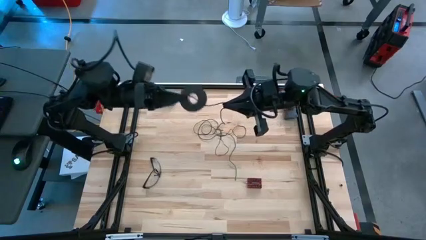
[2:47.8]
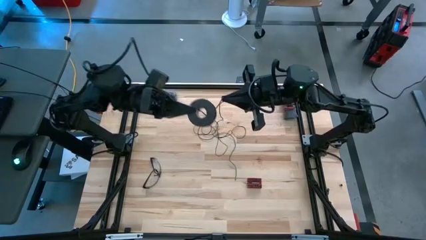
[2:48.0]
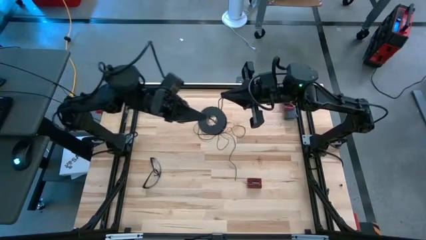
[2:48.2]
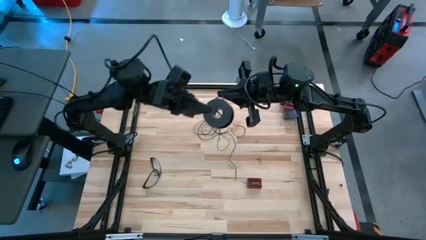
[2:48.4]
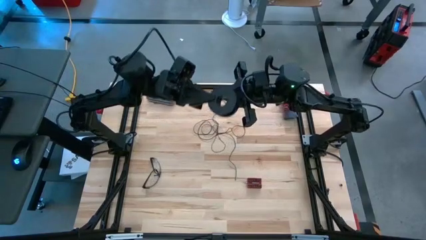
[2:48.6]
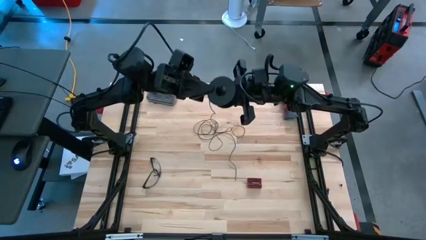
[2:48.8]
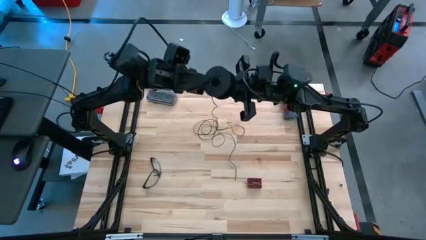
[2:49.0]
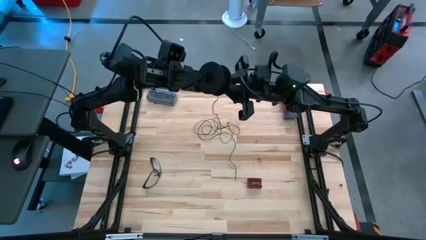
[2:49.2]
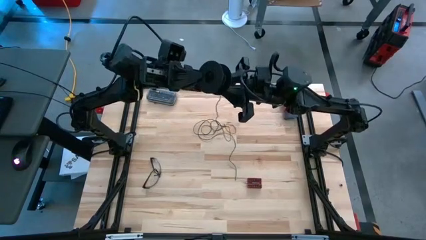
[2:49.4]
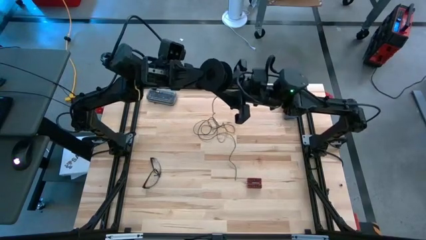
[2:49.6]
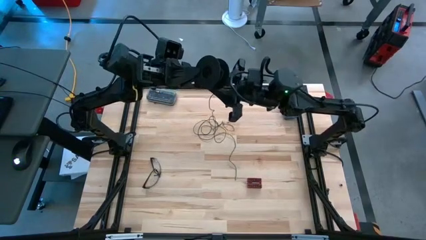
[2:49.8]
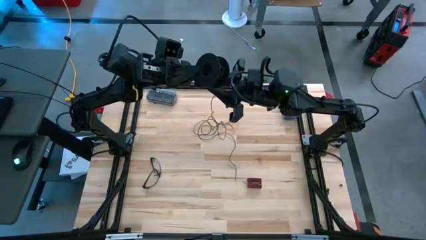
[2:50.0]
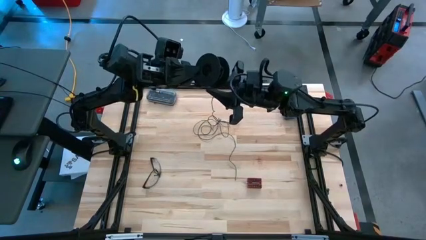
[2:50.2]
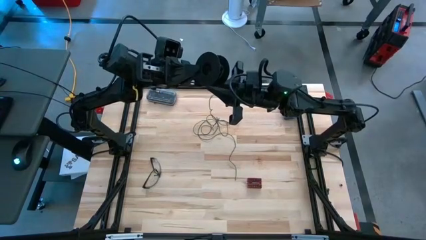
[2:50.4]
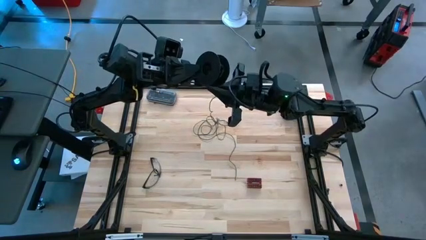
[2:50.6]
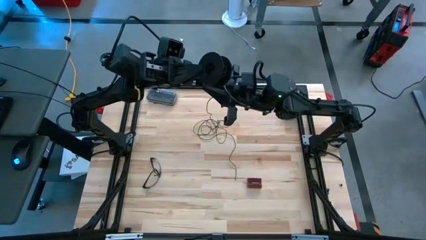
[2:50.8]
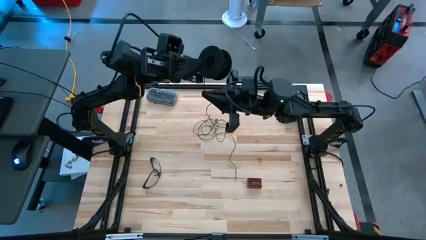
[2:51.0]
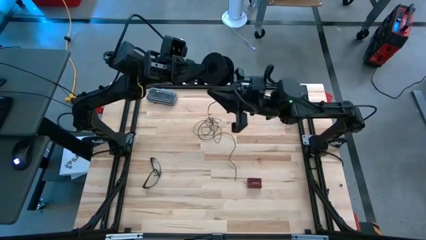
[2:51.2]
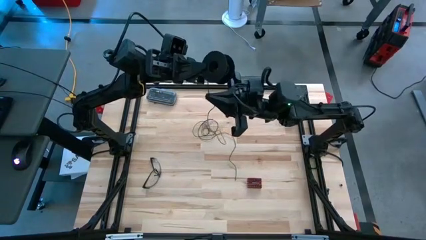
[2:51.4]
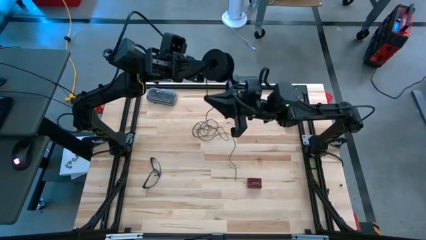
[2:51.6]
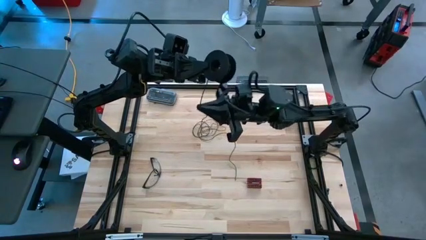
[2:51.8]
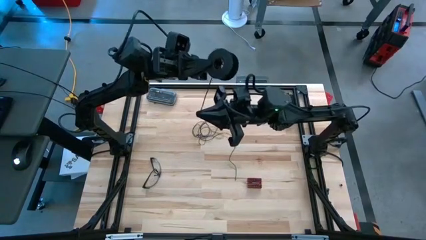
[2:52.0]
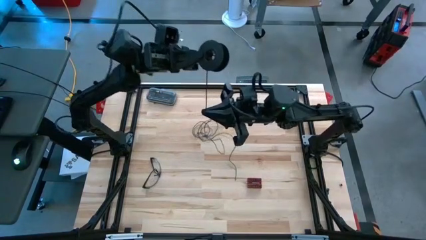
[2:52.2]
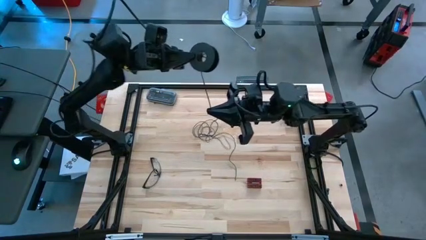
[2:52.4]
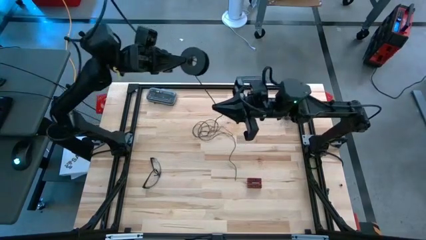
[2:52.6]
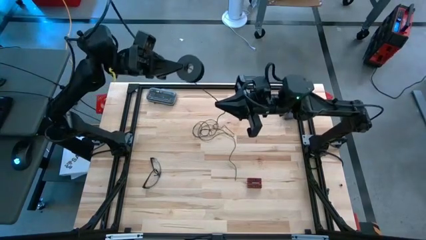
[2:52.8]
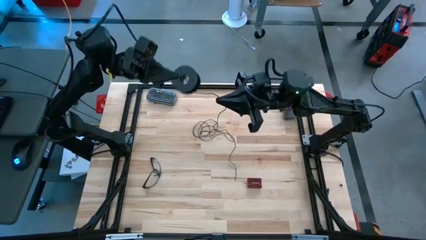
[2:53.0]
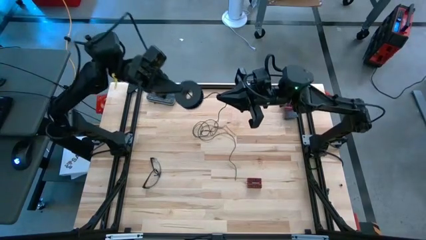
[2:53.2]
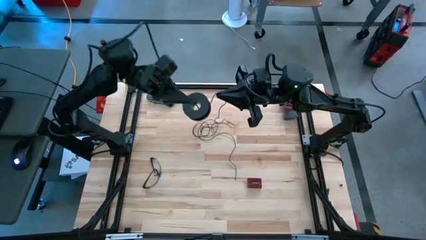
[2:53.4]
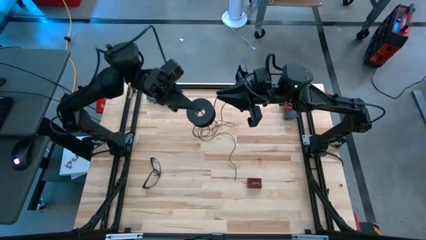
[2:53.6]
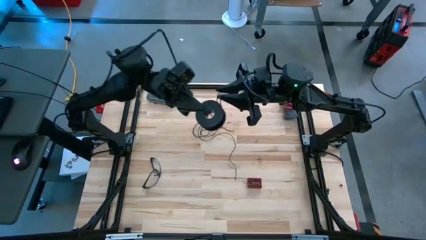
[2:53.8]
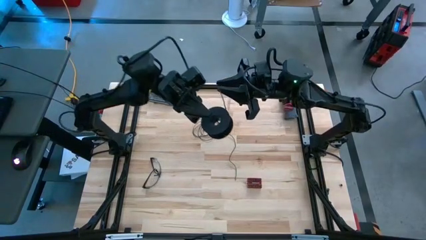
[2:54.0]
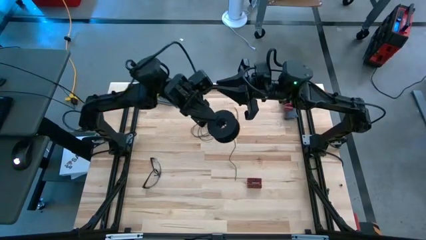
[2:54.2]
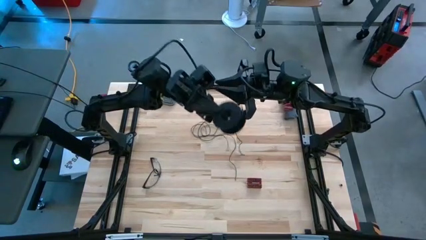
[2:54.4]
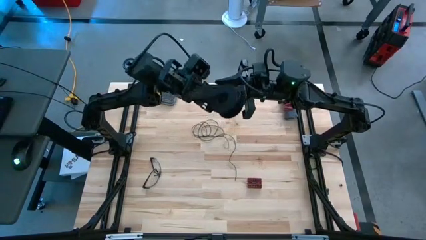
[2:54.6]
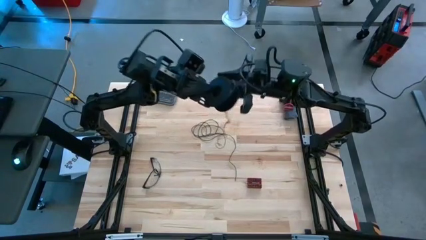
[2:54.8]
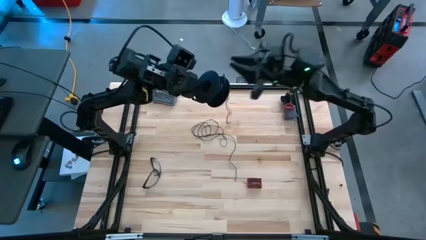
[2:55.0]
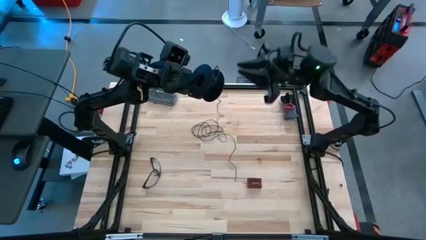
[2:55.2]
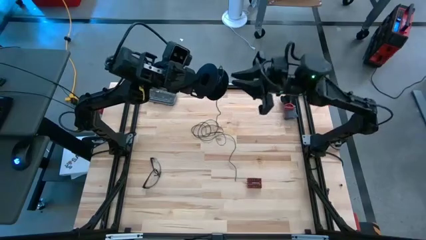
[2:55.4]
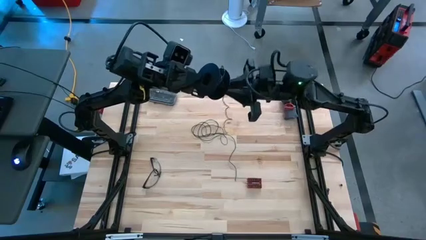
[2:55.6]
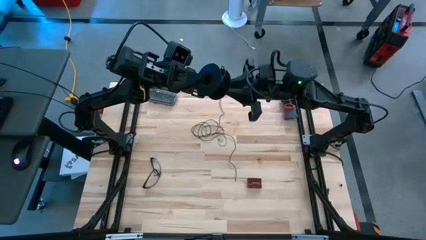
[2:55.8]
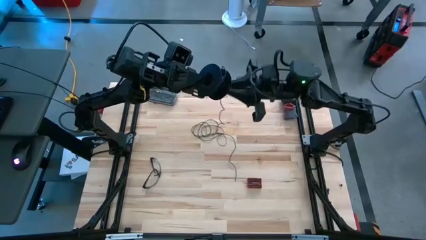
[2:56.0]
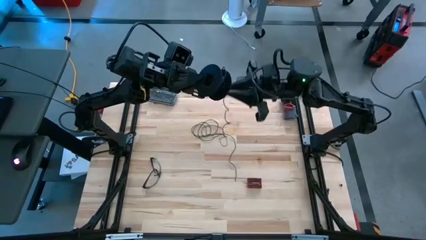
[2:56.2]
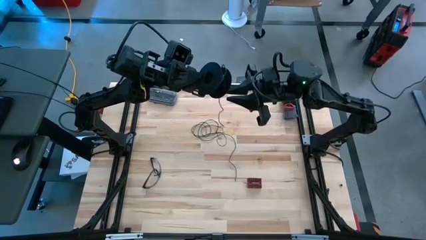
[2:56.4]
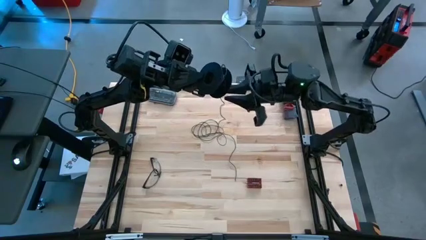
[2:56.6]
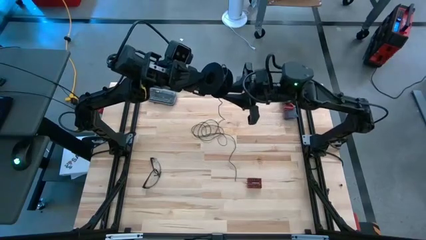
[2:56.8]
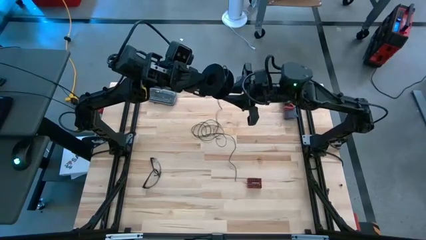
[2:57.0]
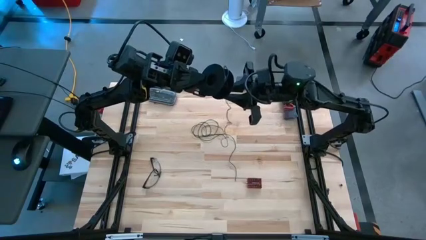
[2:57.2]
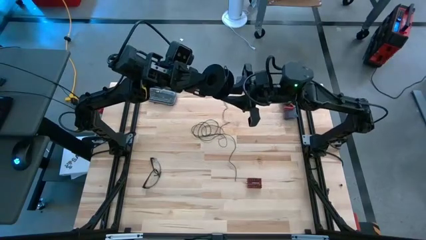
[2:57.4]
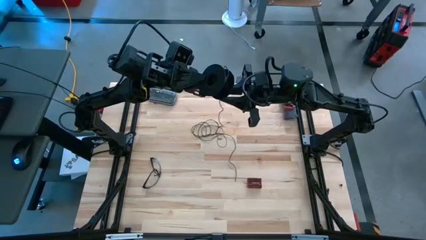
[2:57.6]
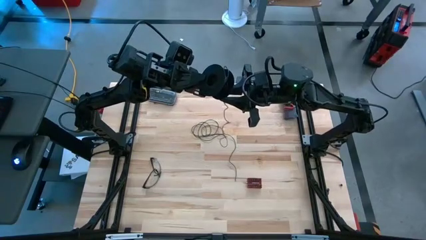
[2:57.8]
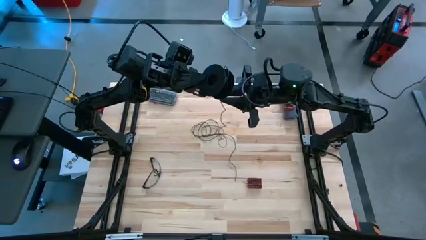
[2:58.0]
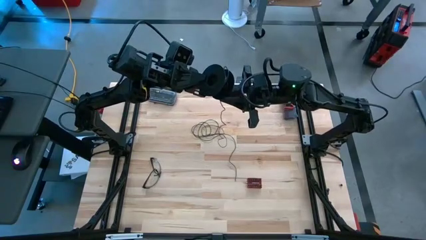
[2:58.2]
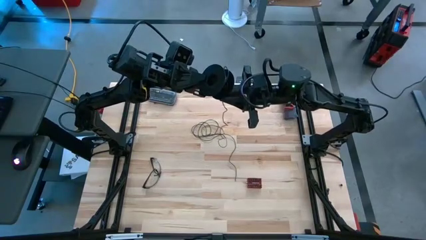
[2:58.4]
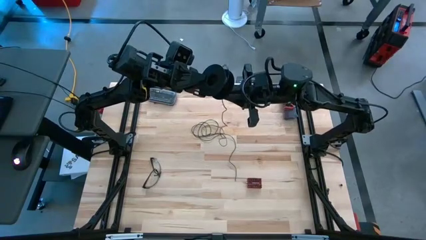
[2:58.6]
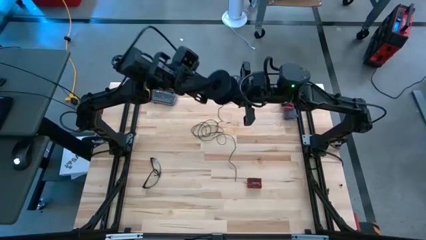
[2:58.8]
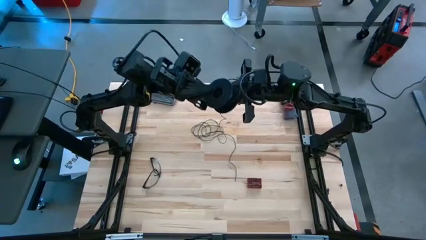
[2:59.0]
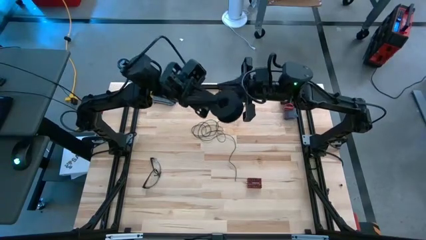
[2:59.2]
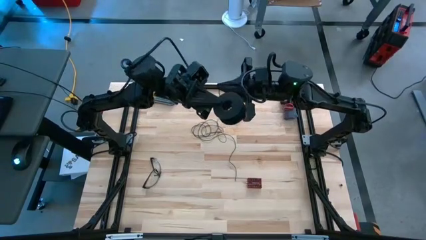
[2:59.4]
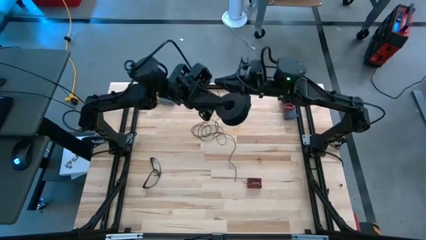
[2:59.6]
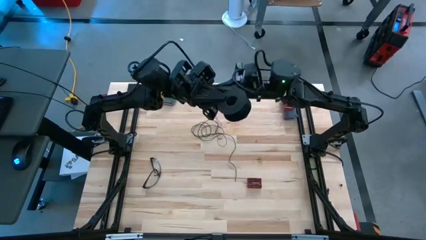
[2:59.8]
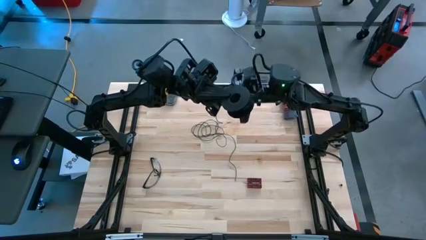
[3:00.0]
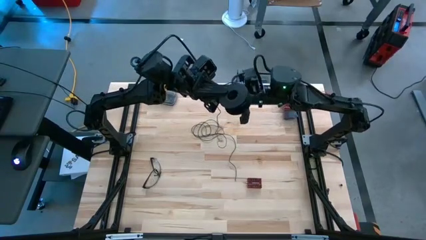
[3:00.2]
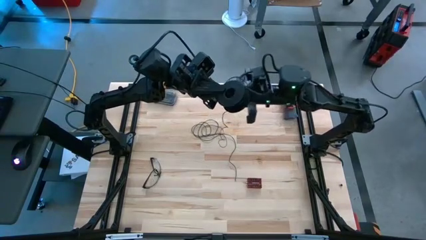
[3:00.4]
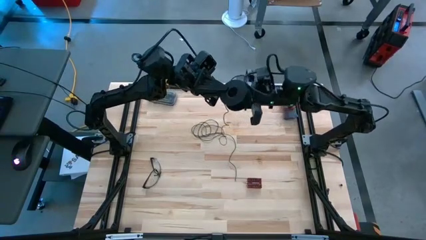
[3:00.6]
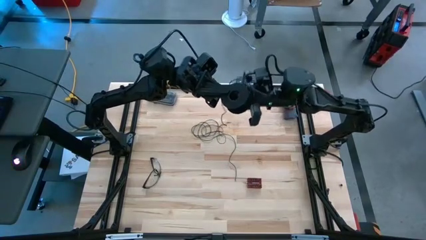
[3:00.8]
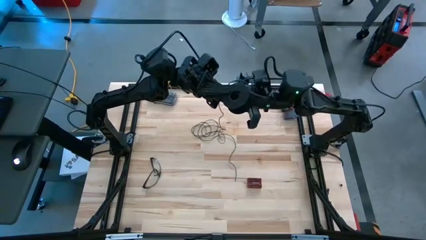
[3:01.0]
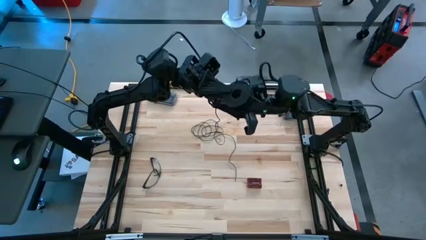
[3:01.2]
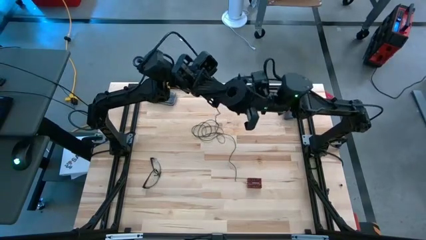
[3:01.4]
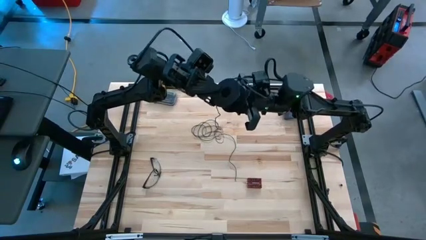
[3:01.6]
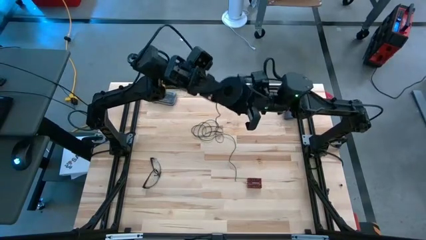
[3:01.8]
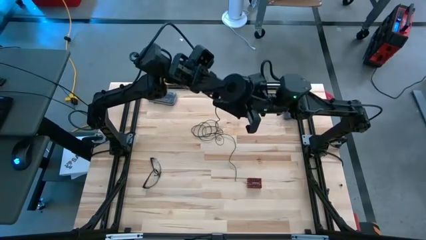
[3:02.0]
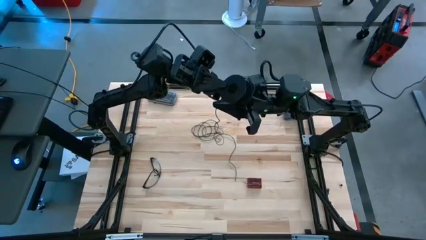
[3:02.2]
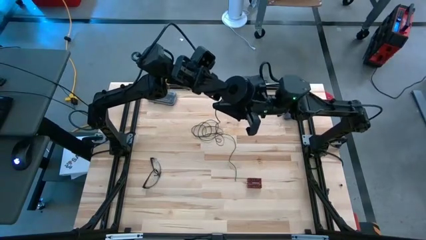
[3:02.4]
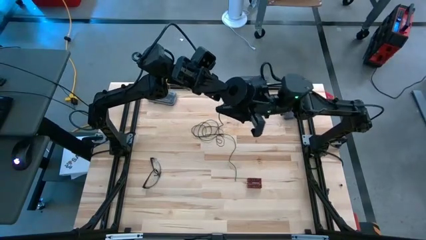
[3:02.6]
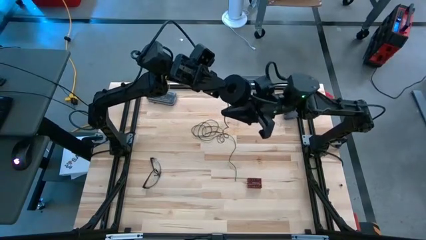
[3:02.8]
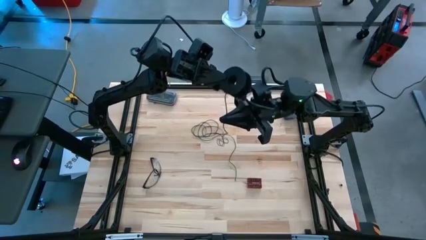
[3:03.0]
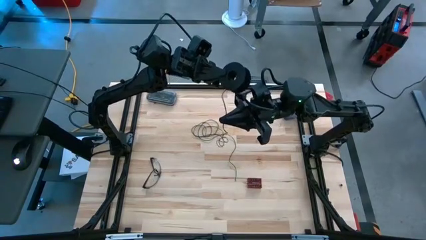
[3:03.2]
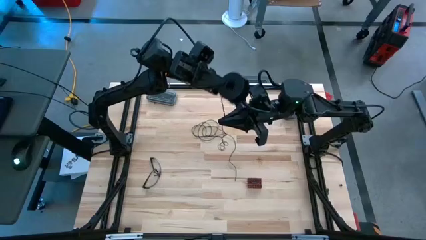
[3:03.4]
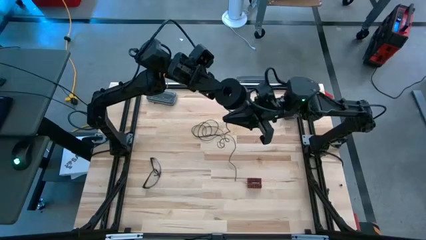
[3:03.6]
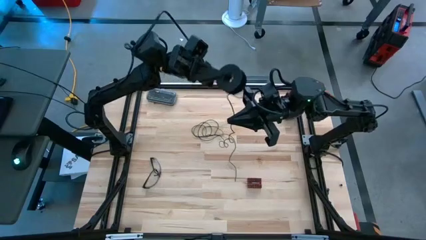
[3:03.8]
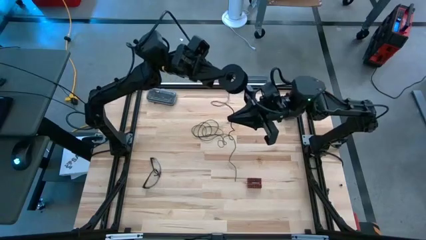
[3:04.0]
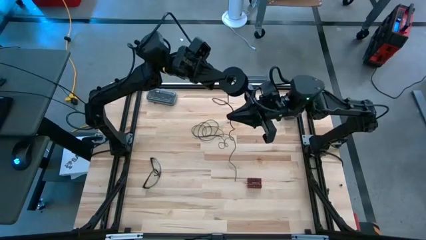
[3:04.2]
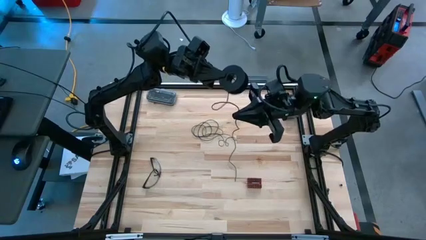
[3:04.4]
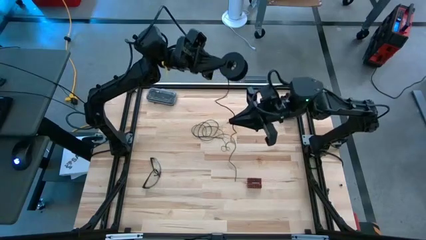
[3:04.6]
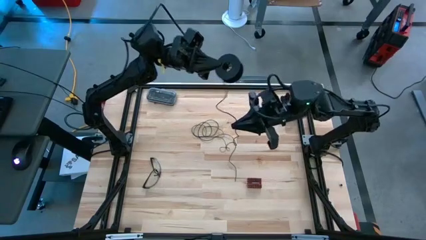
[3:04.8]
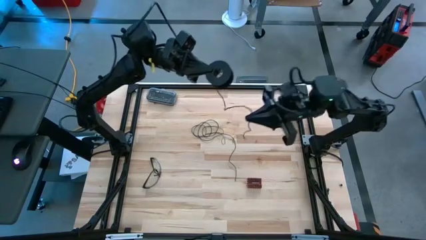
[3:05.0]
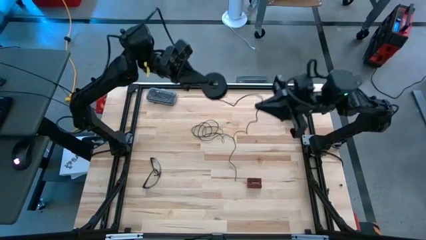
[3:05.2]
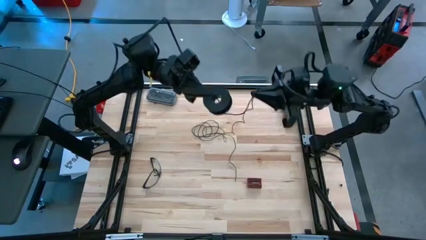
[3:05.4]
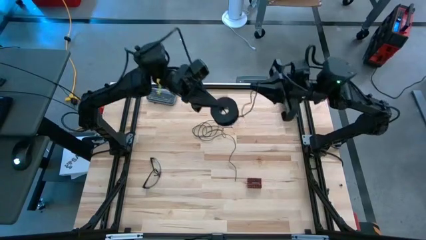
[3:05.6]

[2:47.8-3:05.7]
Task: Coil cords
Coil the black wire into the spool
